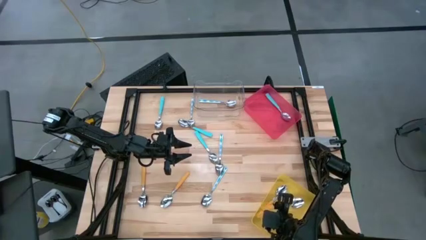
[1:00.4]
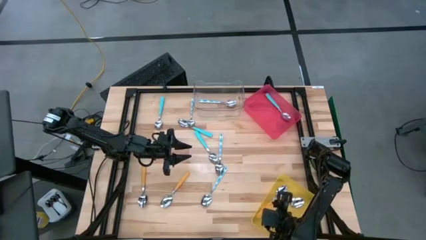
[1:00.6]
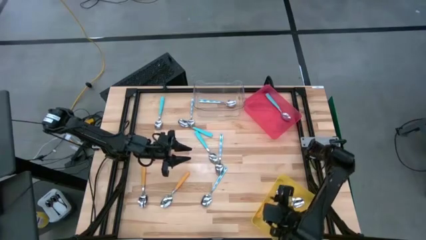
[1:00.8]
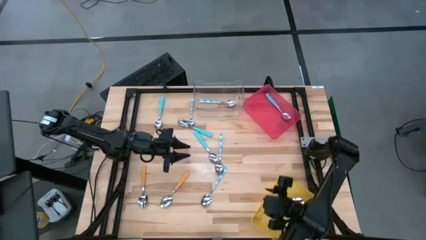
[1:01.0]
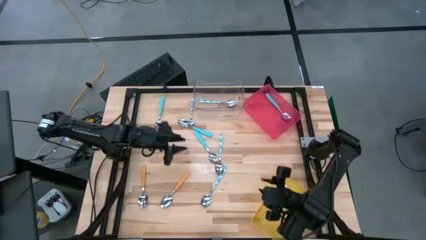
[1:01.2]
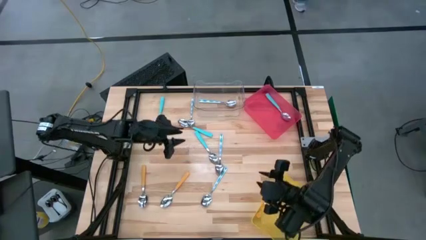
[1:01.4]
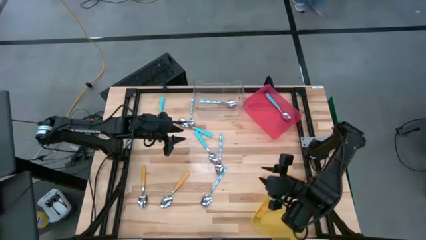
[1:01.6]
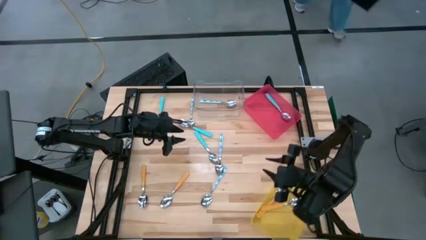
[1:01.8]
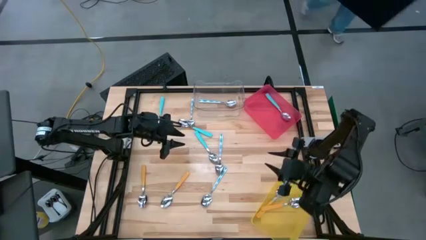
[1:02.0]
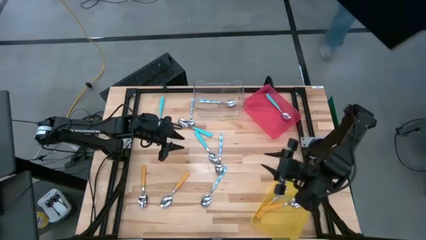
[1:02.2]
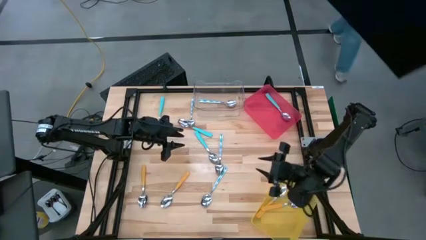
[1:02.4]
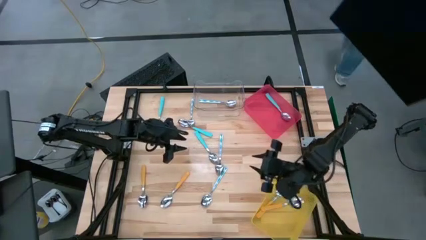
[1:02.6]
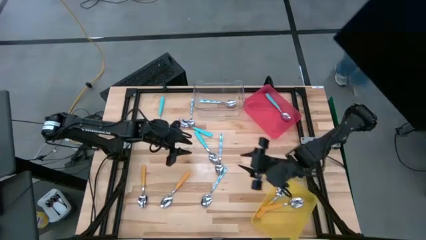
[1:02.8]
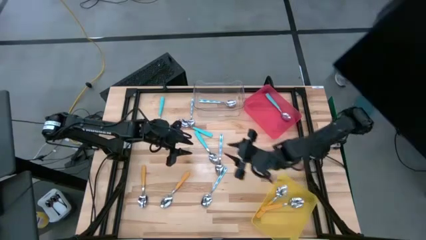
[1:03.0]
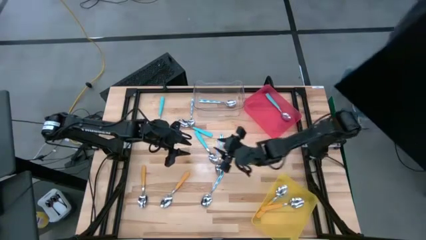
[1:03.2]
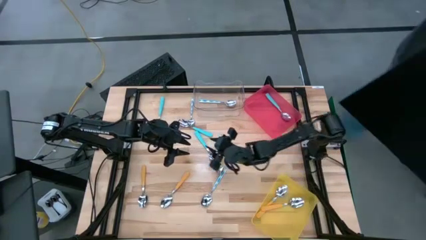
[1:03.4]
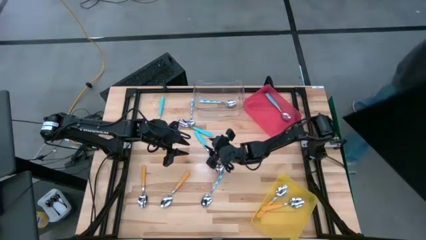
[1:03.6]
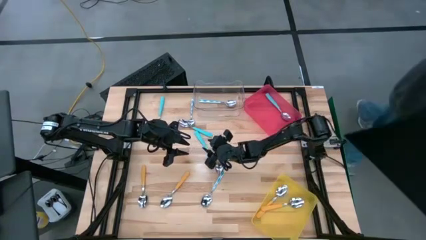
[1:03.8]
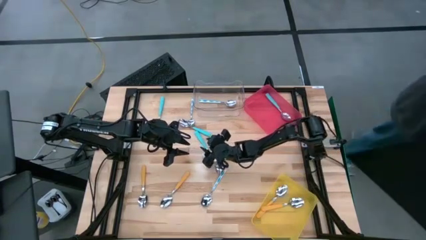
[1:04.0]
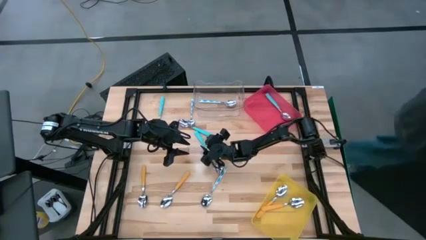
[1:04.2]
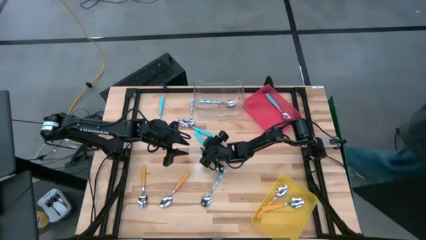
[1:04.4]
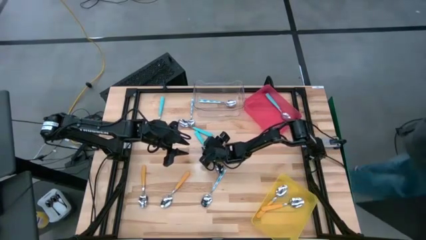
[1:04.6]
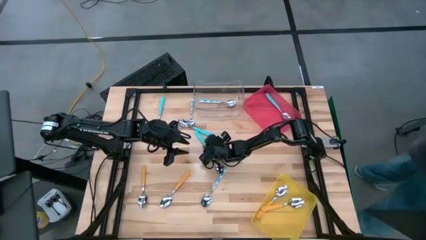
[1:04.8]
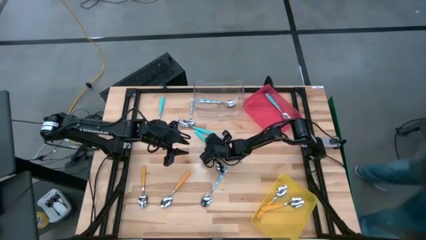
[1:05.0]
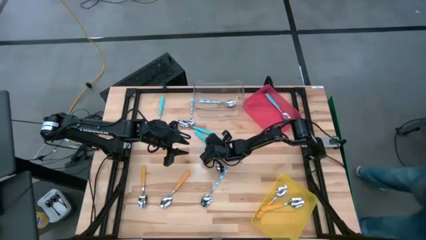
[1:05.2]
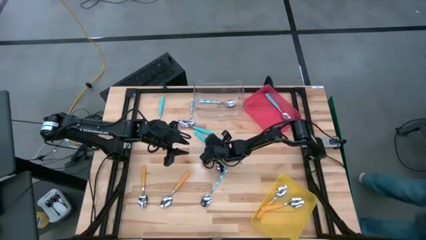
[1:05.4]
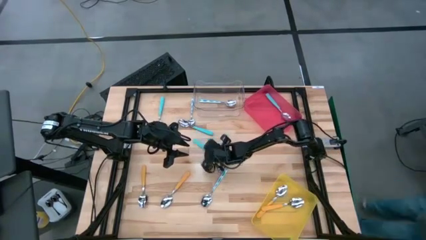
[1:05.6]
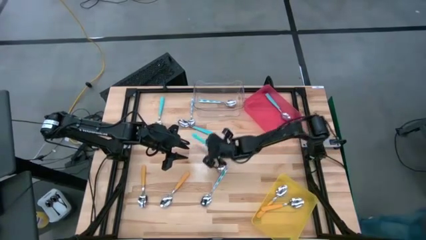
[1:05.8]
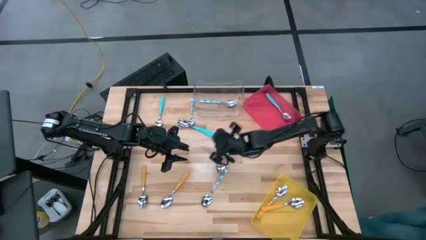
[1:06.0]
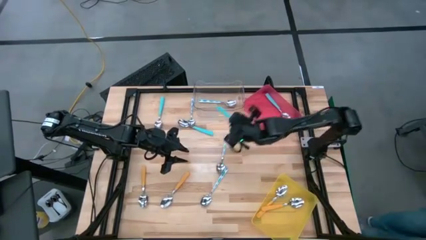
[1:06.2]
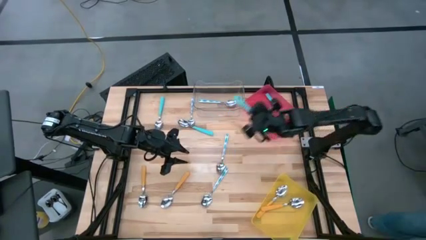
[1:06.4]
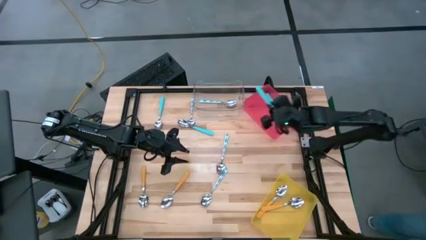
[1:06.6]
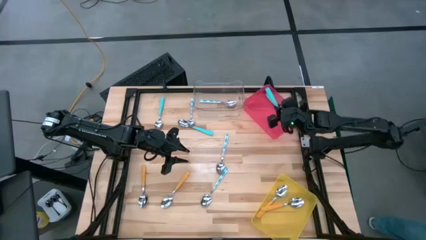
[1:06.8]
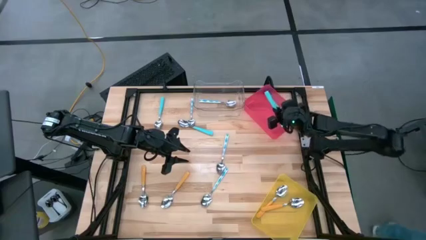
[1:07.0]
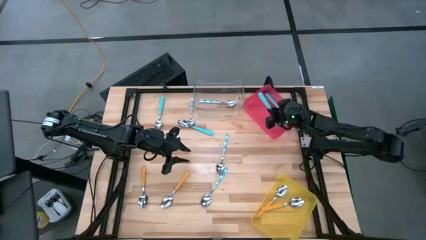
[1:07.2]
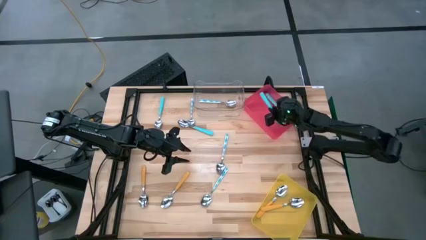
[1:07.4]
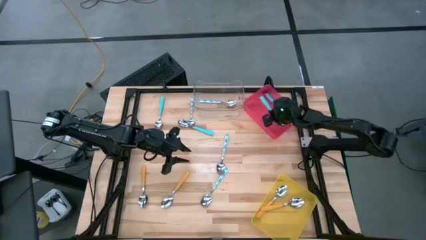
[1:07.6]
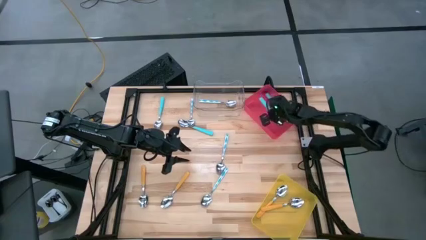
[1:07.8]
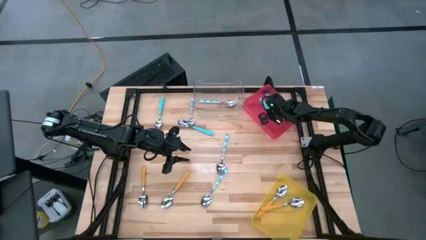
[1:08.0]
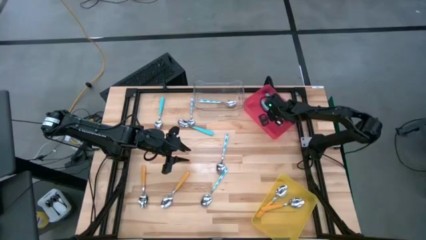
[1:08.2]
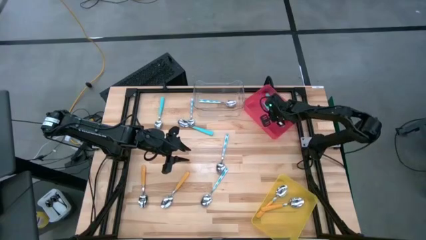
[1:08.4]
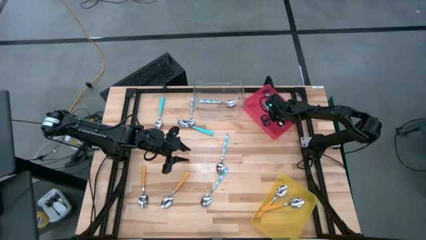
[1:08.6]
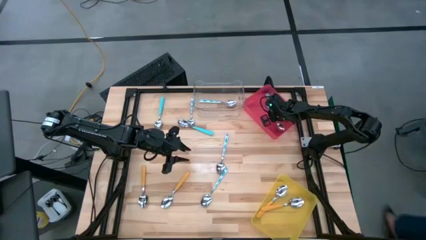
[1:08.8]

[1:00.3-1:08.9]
Task: Sort silverware by color (type)
Put the blue spoon into the red bin

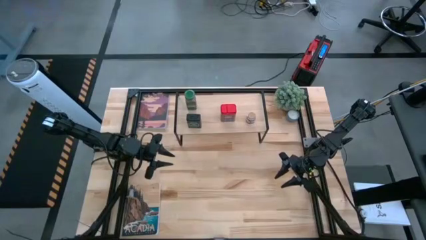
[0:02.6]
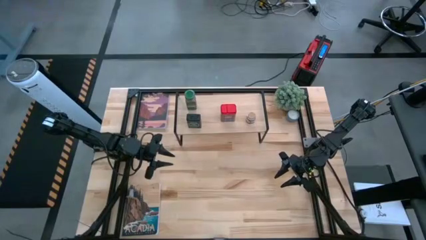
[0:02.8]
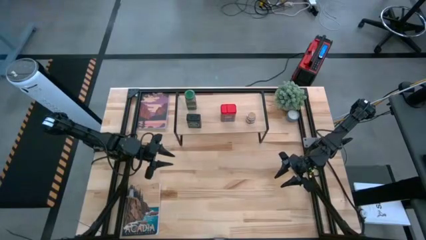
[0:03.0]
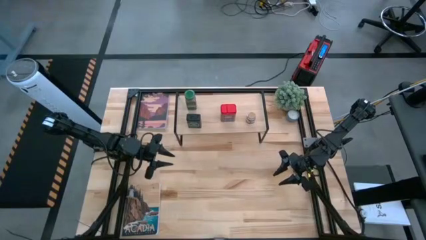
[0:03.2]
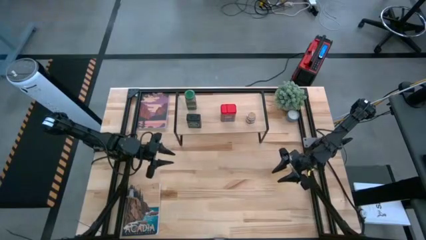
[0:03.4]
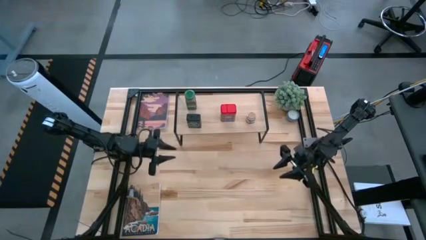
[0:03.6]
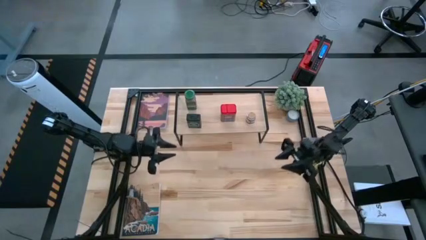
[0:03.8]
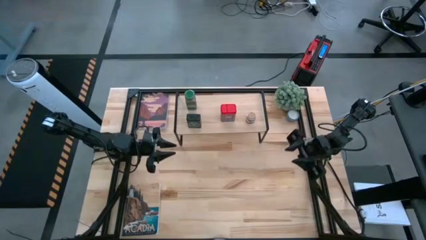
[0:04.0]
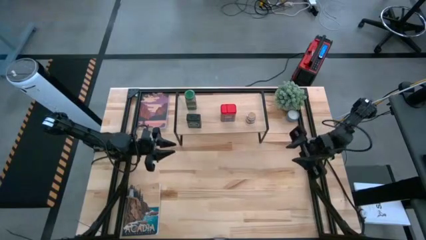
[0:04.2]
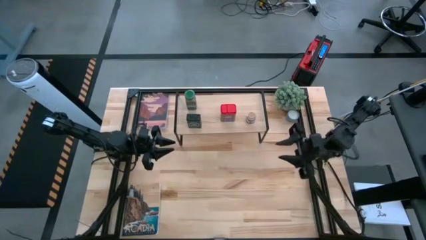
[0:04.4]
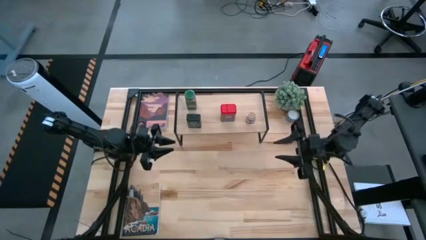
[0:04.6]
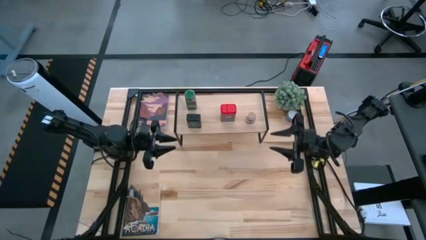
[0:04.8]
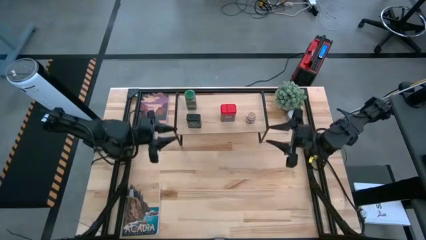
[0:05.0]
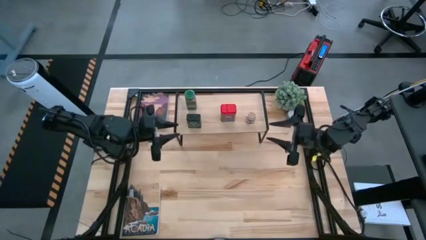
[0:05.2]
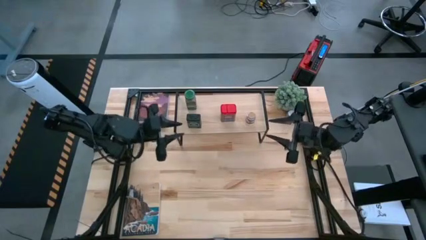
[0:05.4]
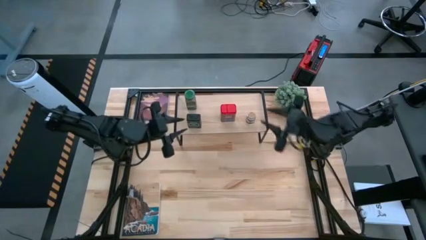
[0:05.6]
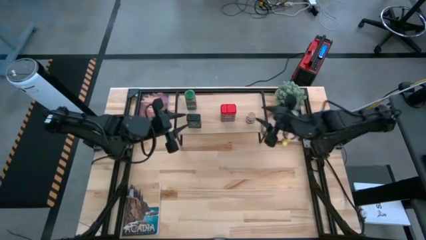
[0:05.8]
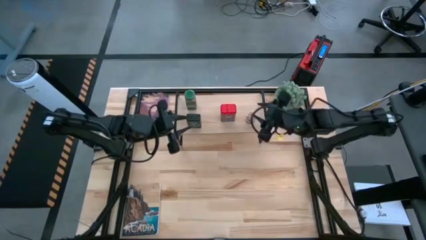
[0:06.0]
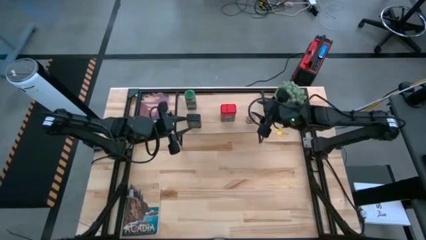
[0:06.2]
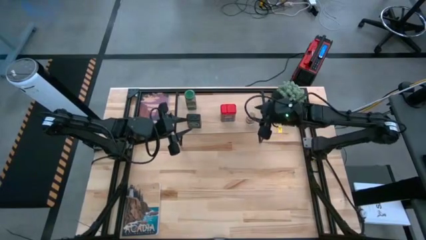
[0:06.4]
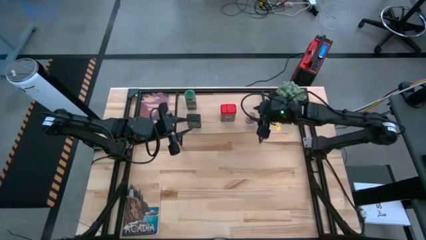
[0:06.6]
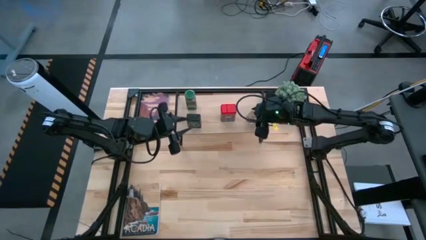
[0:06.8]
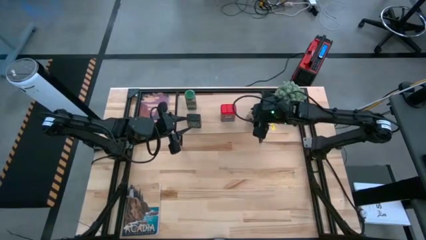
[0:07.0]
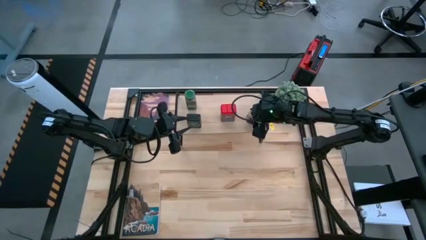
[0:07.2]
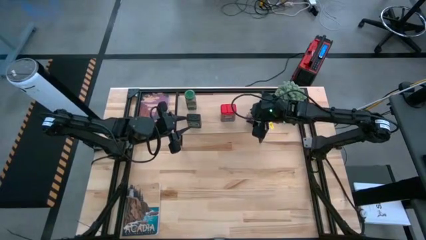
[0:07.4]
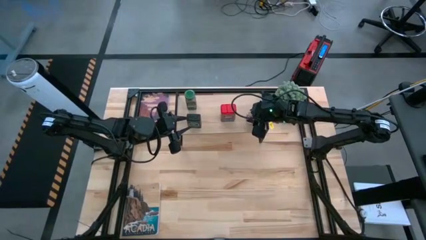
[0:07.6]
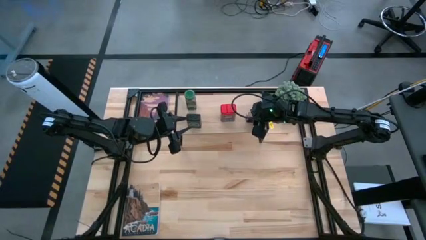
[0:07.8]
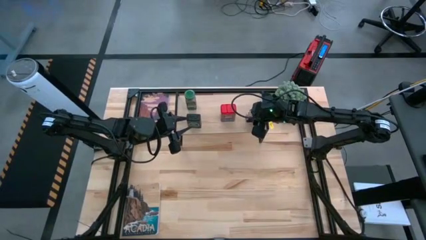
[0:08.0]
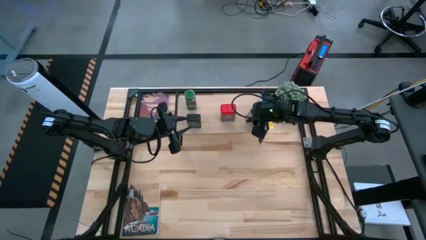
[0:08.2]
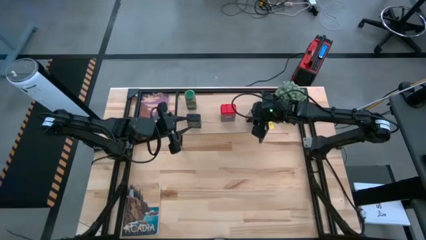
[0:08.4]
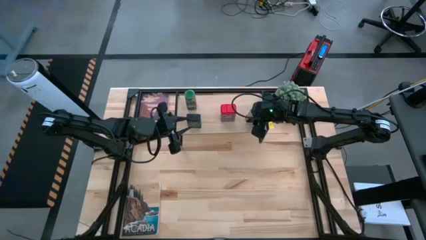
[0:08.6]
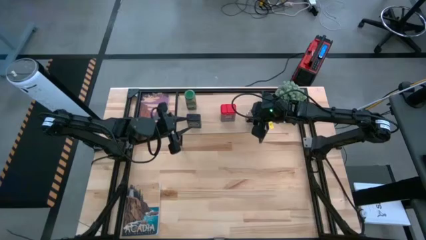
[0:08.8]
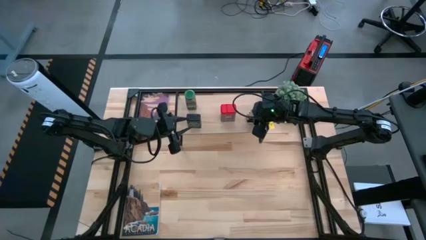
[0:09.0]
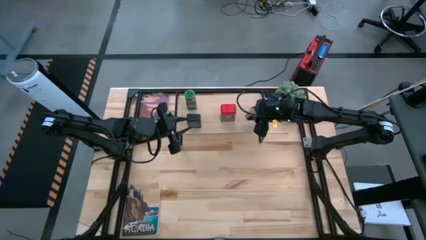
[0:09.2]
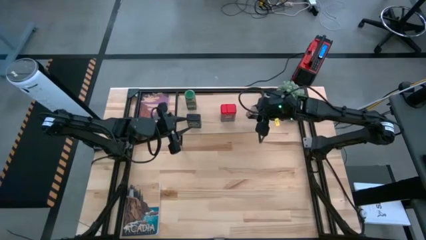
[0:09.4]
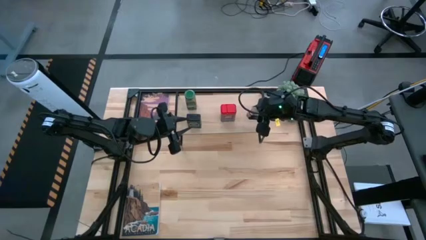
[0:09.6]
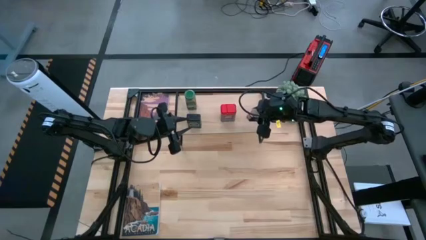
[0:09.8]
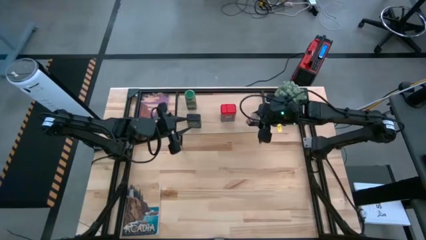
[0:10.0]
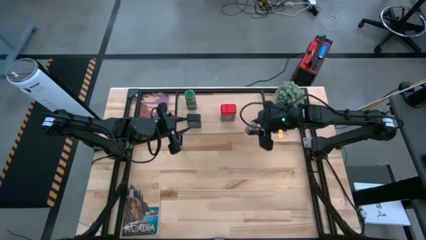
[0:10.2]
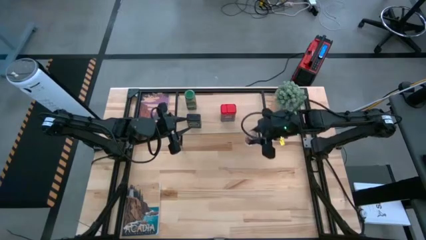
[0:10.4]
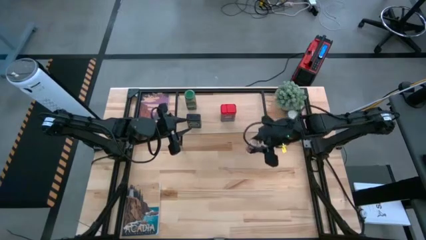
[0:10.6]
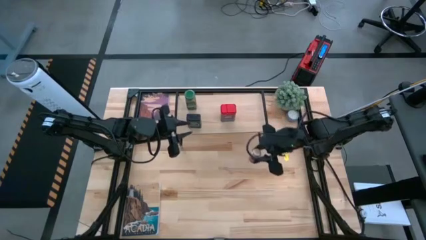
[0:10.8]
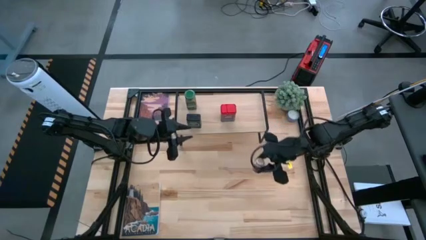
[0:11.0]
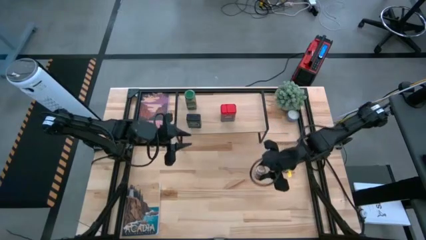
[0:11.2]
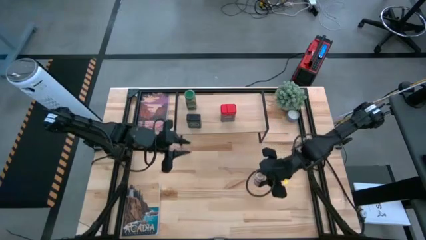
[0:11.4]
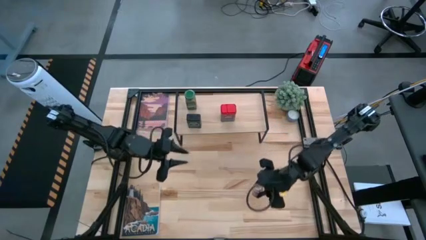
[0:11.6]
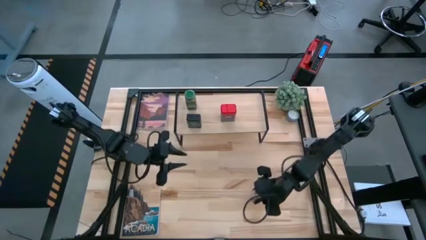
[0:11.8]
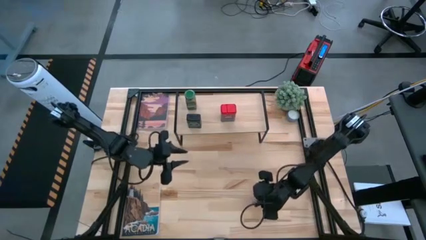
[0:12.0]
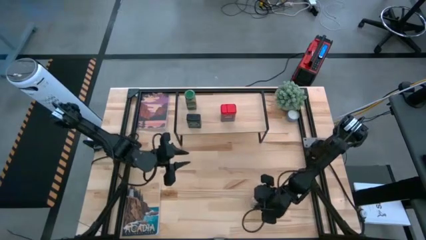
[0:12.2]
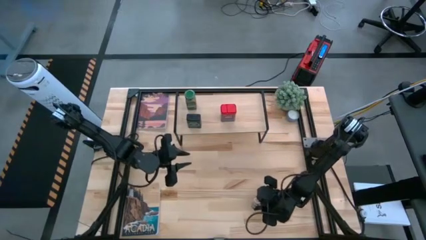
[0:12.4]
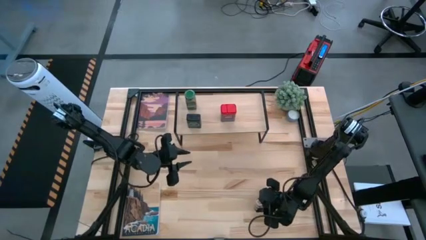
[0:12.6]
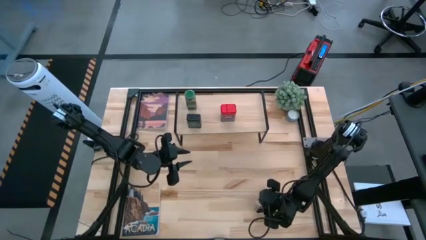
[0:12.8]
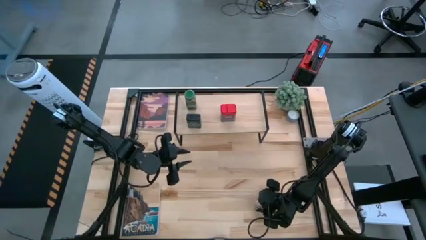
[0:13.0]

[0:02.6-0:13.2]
Task: Shelf spices
Remove the brown seasoning bottle from the shelf
